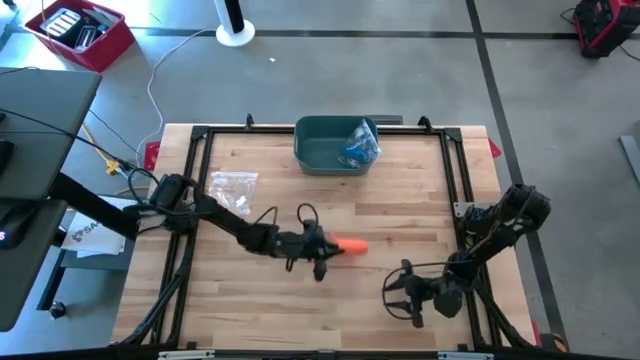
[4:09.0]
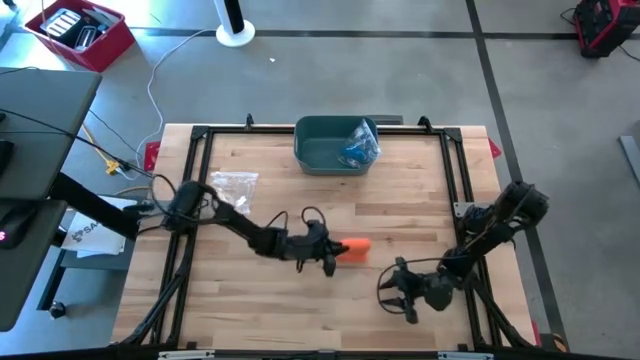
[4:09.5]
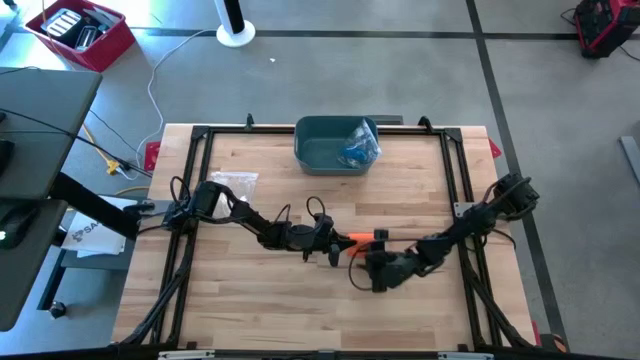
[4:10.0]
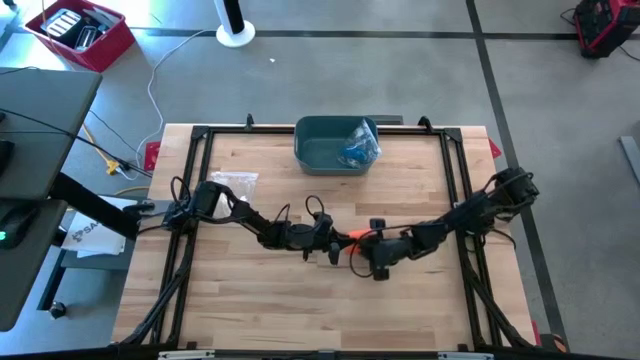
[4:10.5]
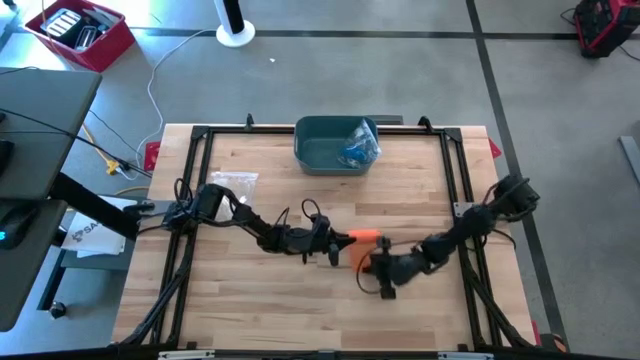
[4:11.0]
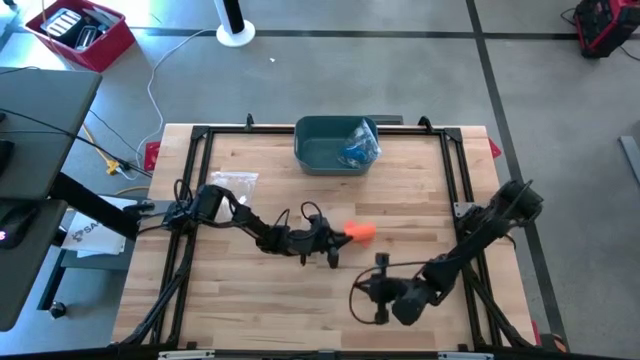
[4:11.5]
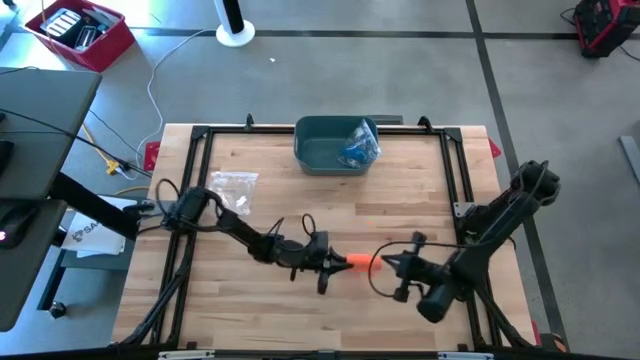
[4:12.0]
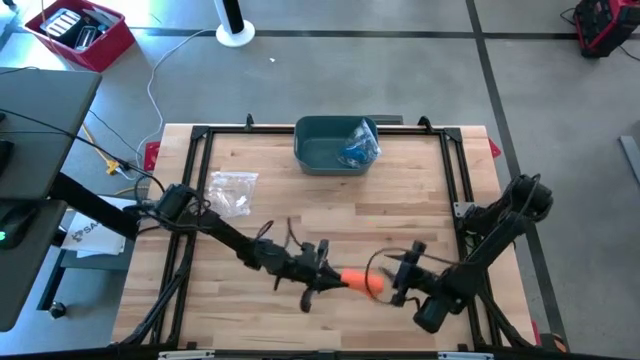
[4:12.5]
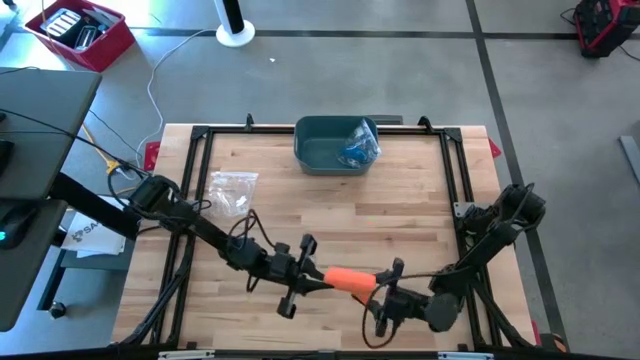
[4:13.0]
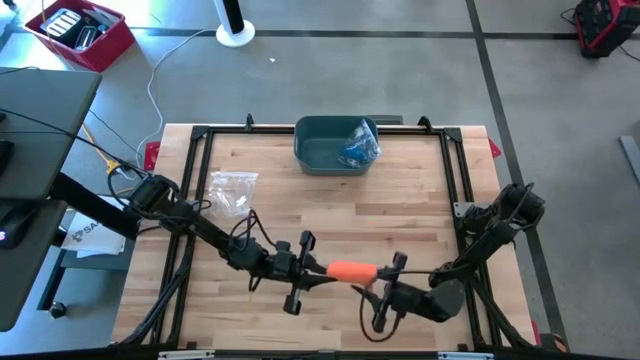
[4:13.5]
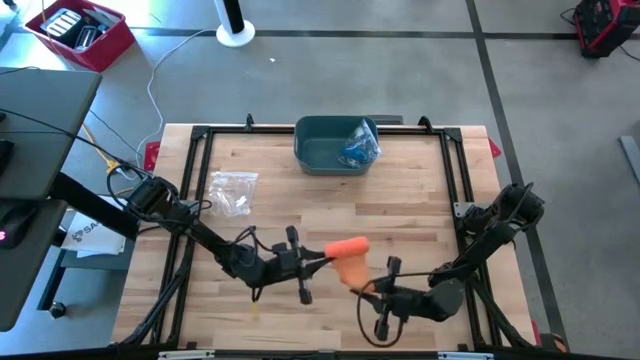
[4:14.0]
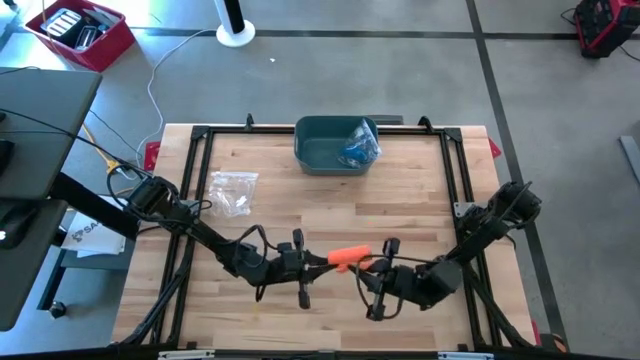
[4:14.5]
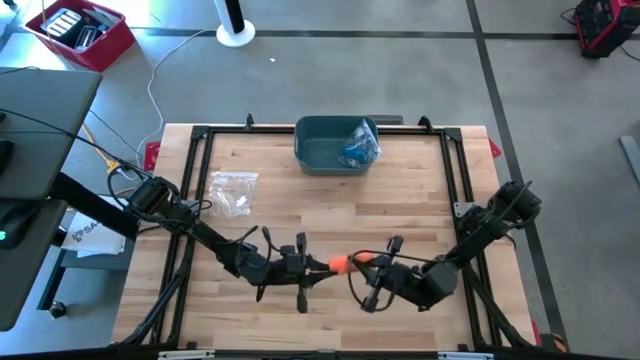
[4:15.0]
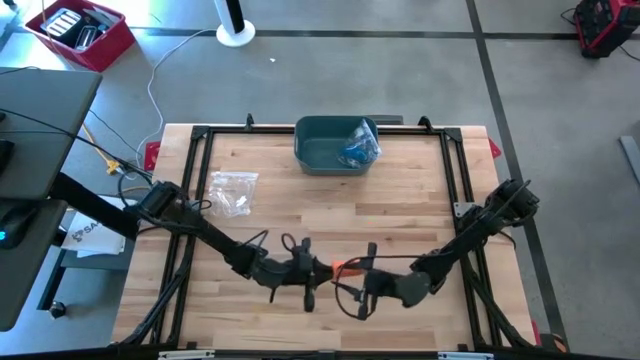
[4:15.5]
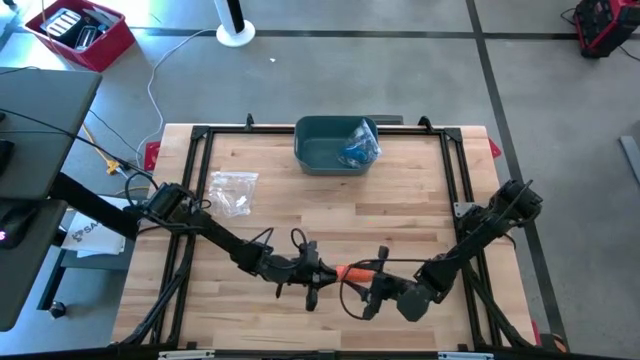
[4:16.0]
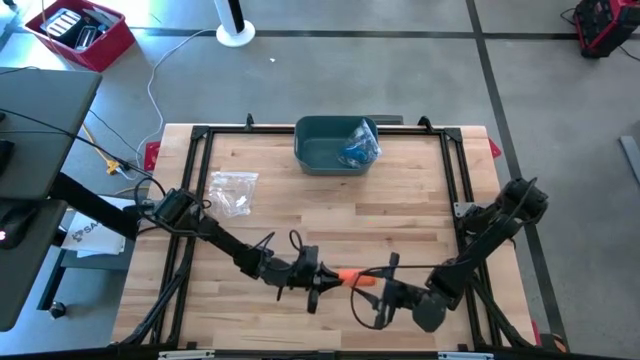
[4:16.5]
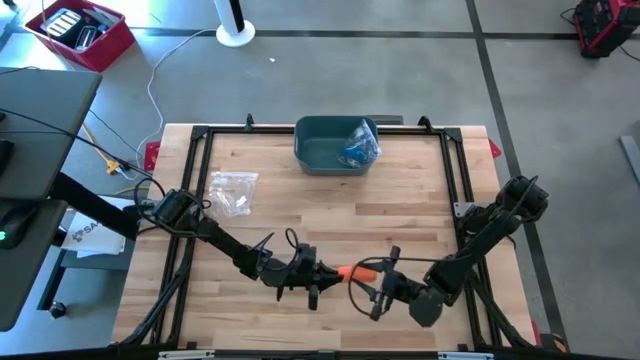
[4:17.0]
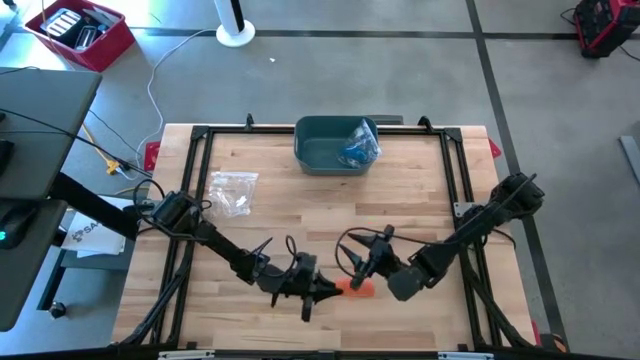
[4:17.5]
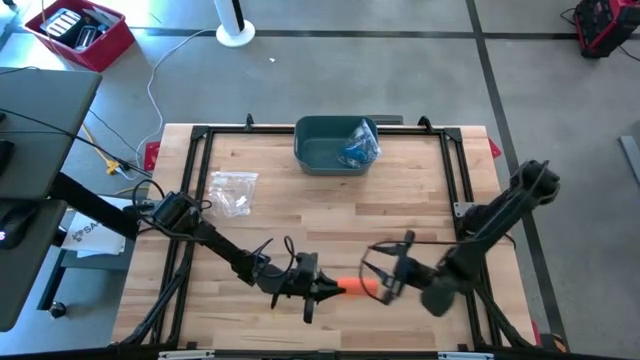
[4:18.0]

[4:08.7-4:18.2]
Task: Roll bandage
Roll the orange bandage

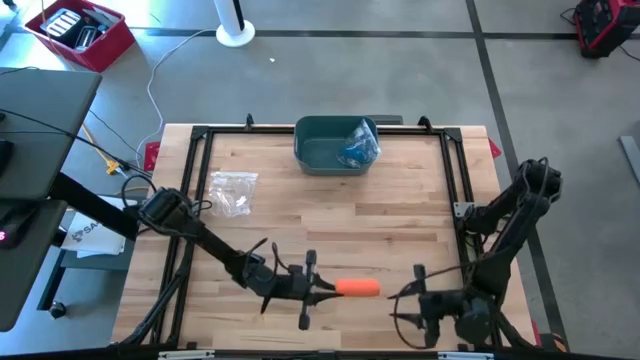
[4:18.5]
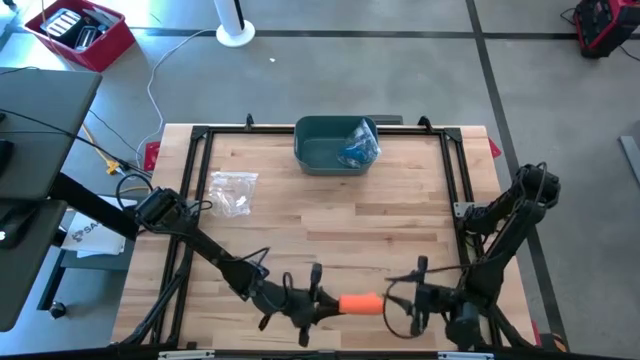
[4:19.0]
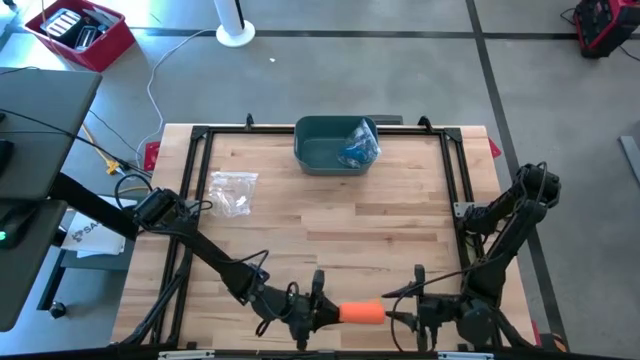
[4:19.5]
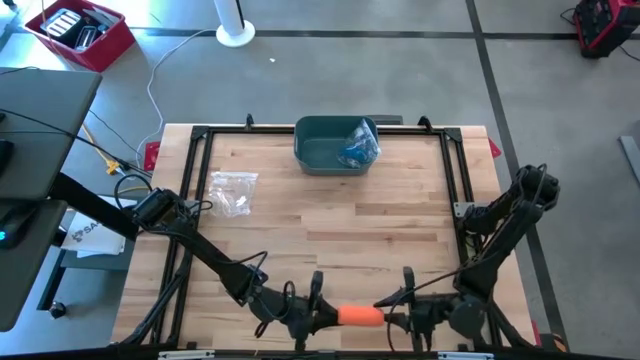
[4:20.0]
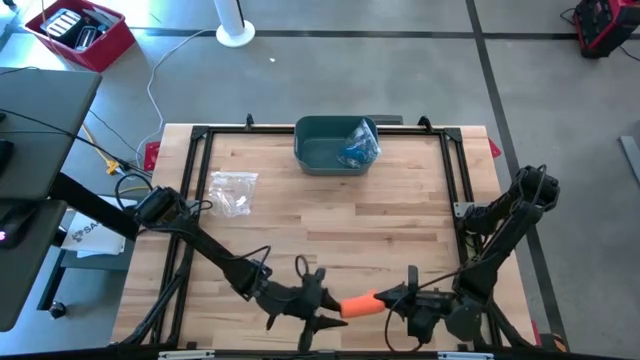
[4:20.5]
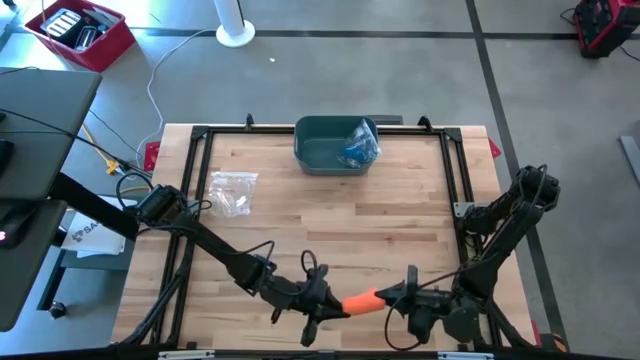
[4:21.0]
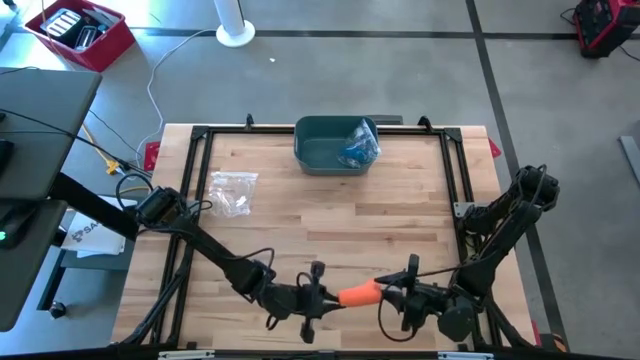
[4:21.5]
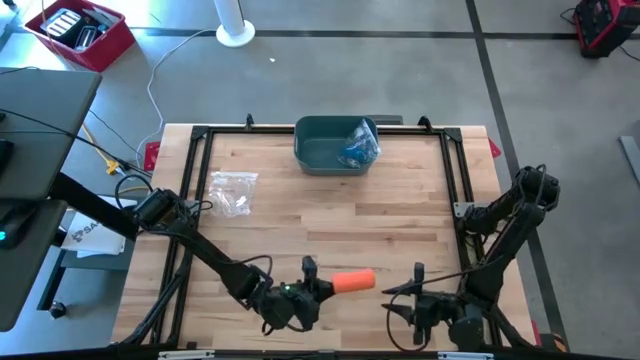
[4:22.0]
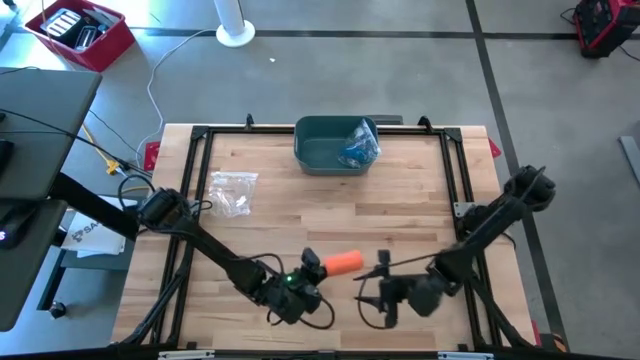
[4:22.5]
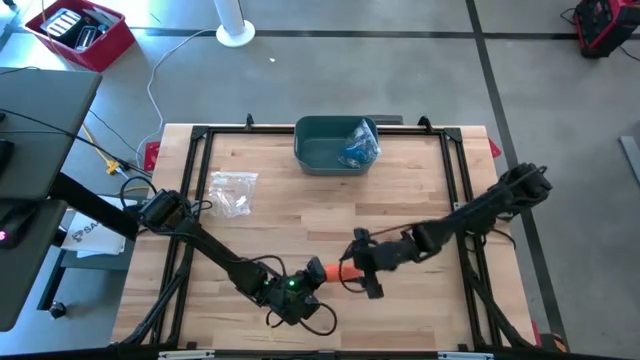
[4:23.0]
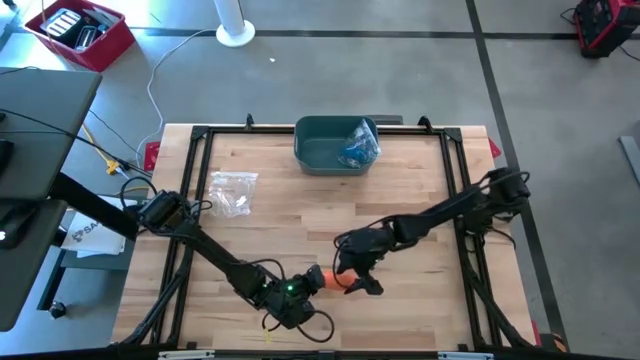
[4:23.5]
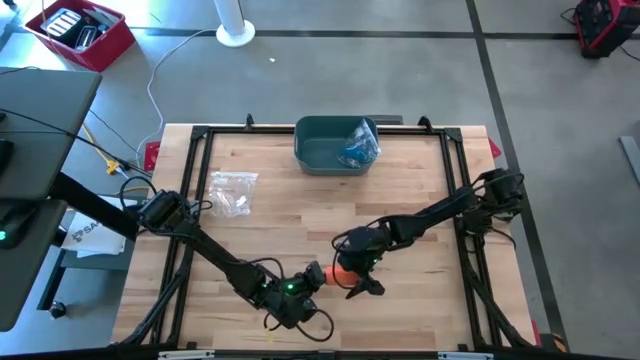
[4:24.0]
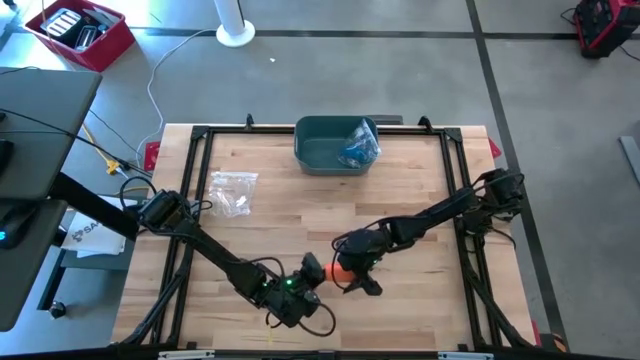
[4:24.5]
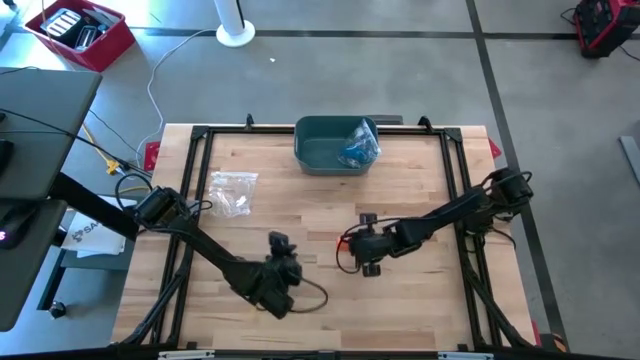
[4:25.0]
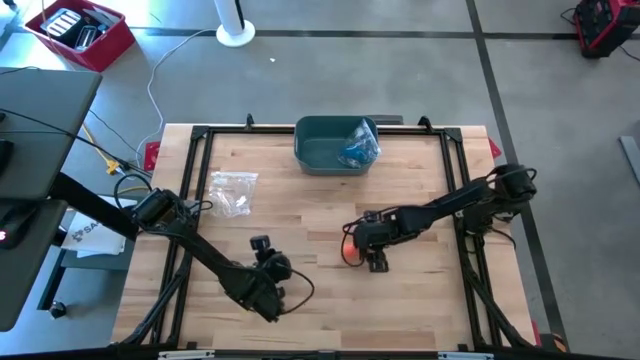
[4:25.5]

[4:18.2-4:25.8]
Roll the orange bandage

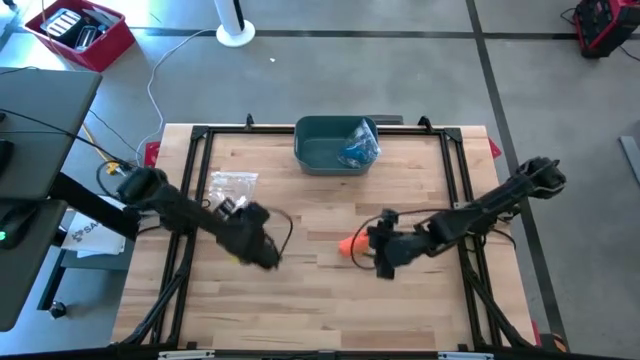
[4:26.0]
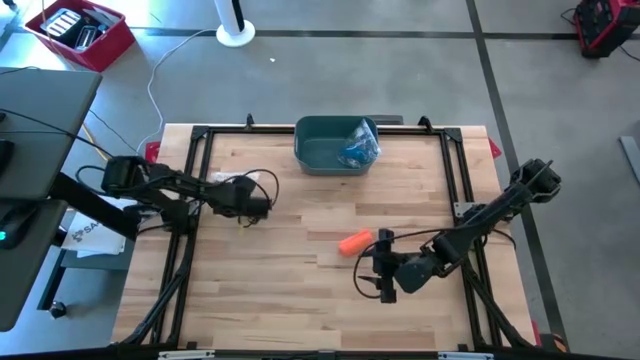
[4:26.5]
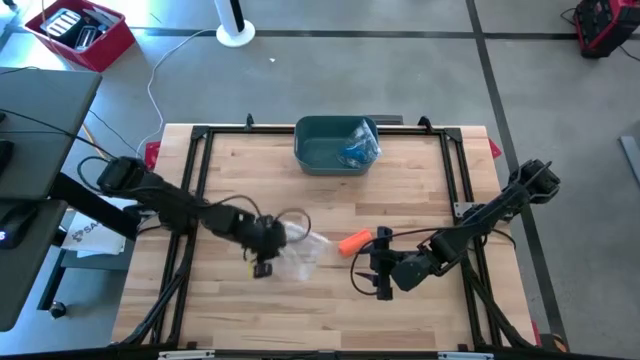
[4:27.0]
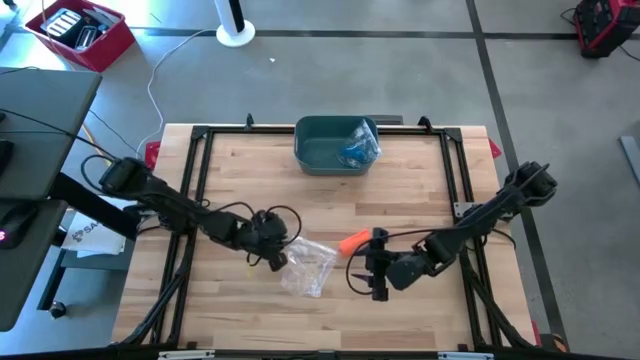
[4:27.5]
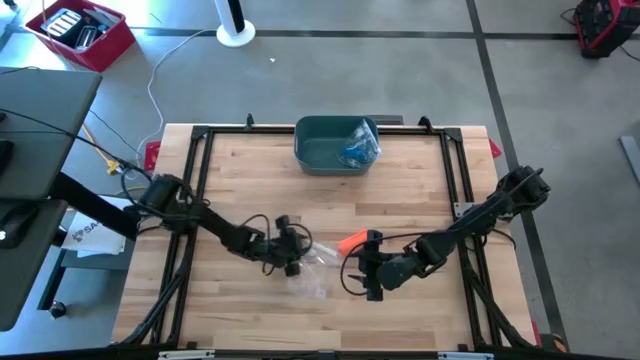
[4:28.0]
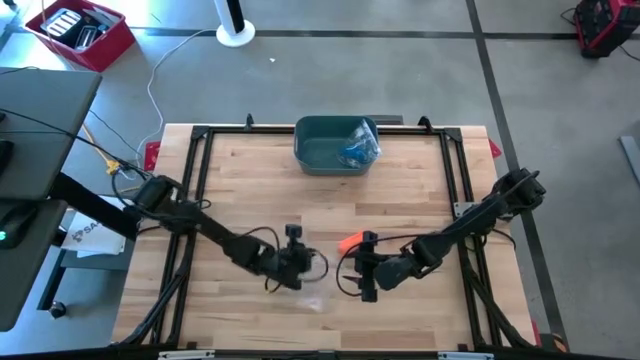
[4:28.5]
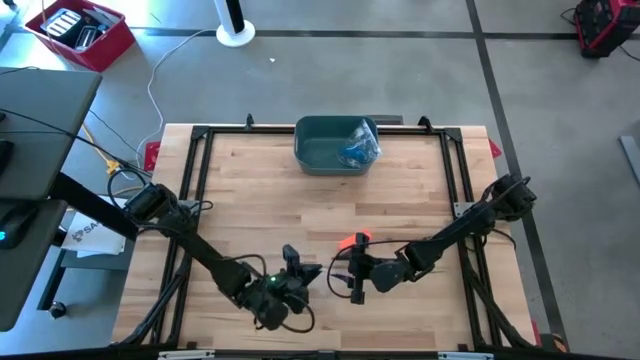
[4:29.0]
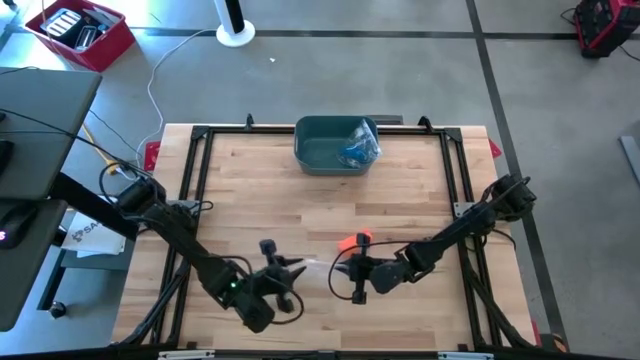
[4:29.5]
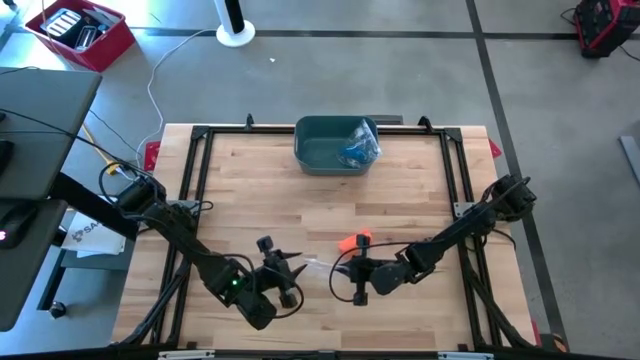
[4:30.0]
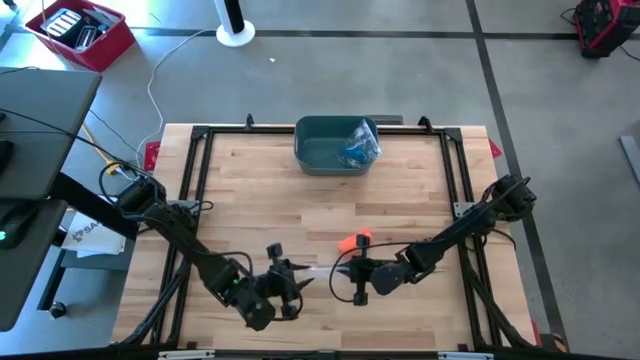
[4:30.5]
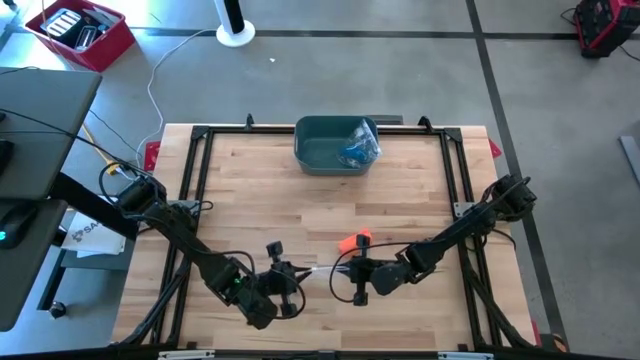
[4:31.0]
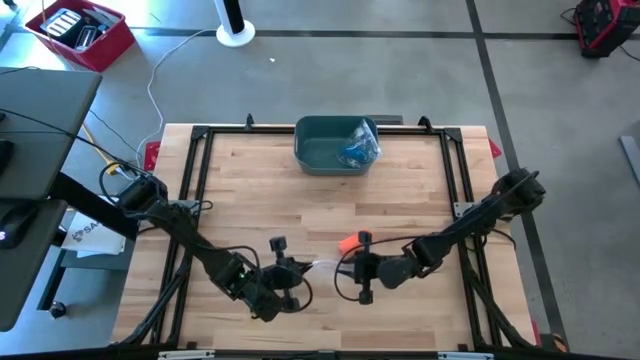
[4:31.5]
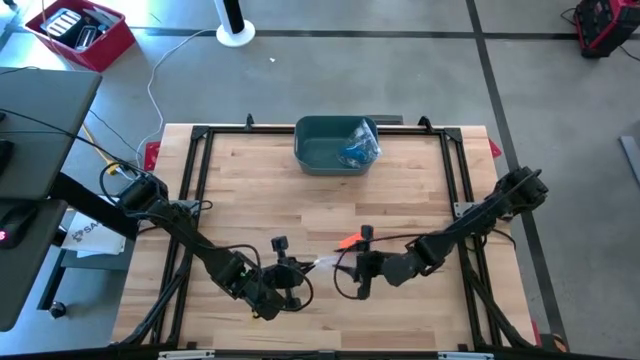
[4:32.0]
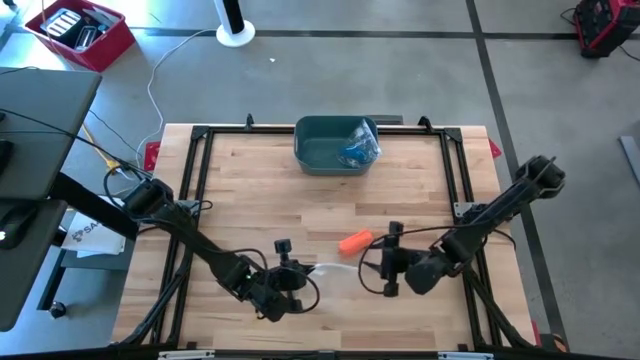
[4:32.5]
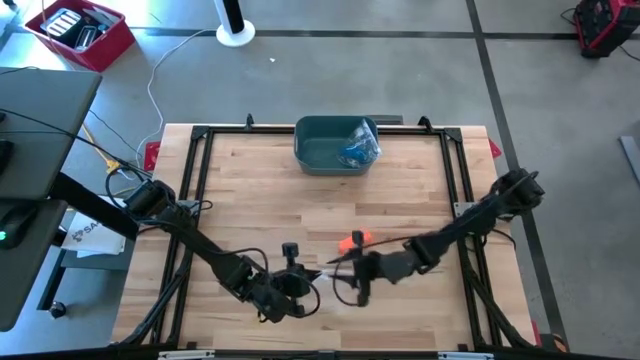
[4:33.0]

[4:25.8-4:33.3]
Put the rolled orange bandage into the transparent zip bag
